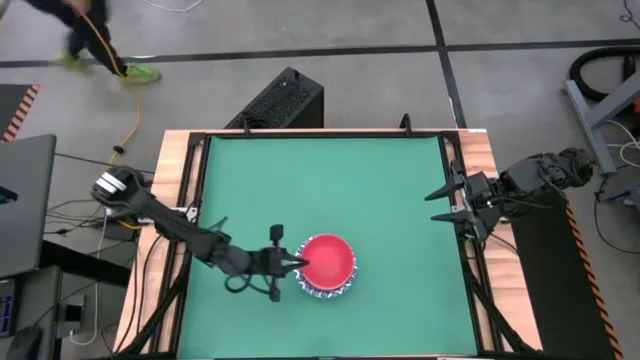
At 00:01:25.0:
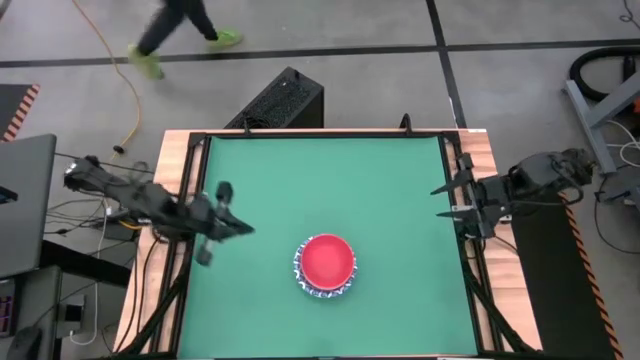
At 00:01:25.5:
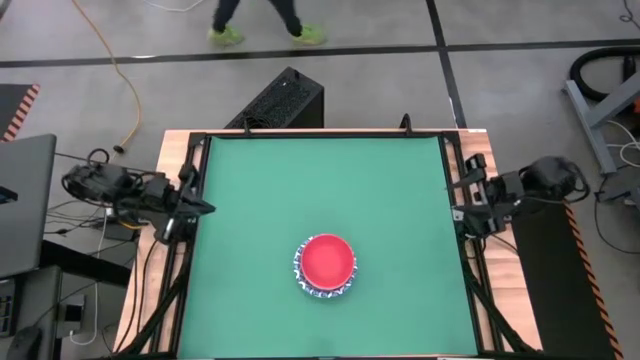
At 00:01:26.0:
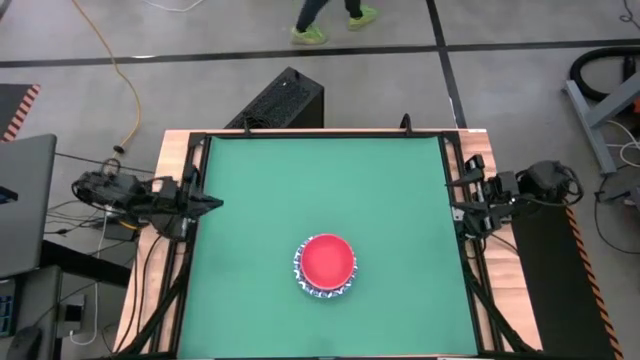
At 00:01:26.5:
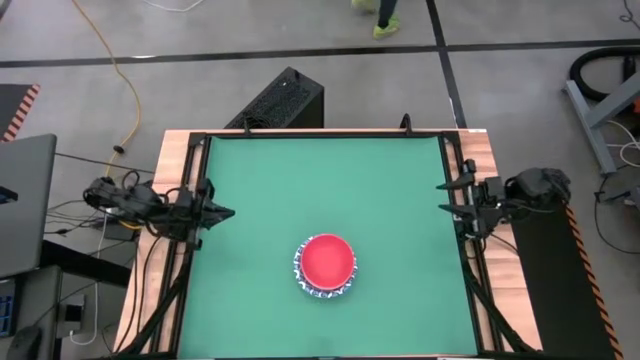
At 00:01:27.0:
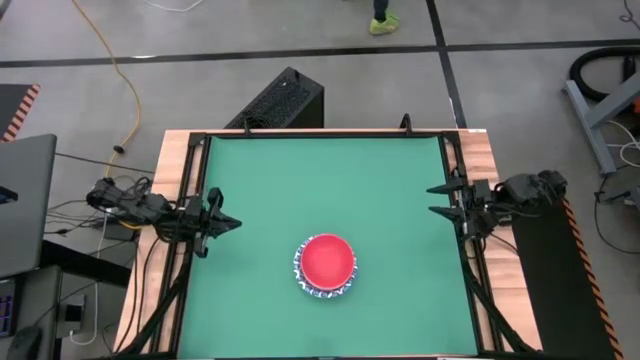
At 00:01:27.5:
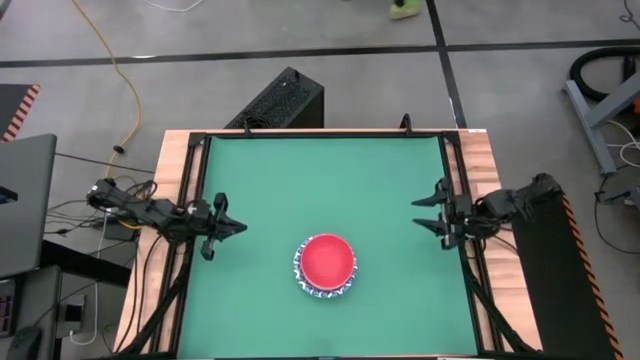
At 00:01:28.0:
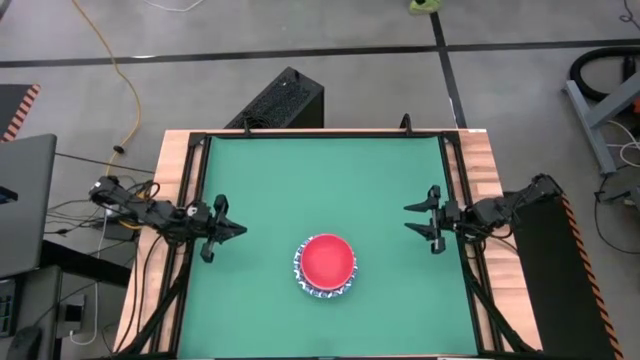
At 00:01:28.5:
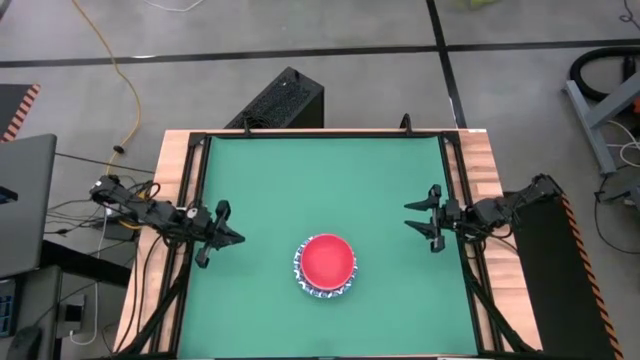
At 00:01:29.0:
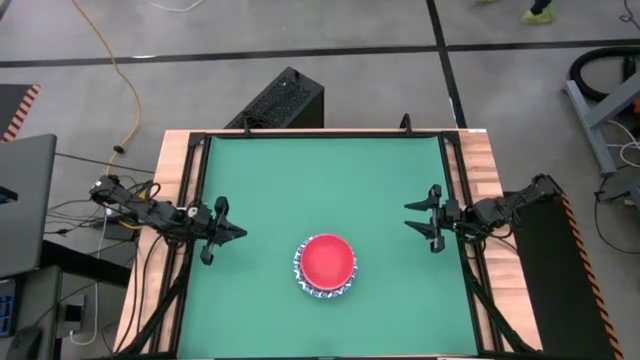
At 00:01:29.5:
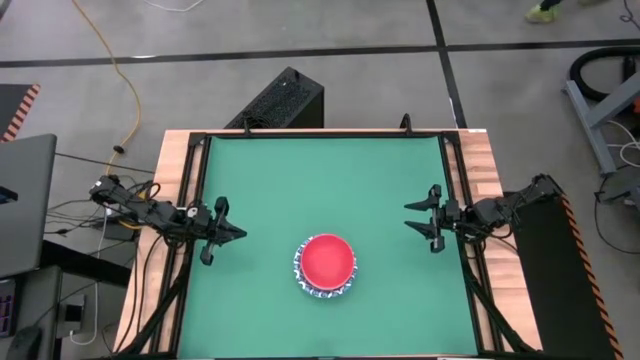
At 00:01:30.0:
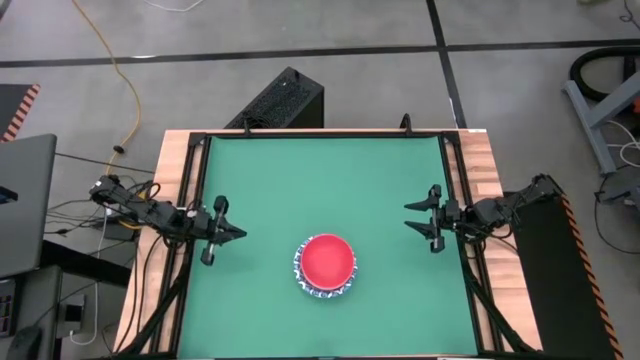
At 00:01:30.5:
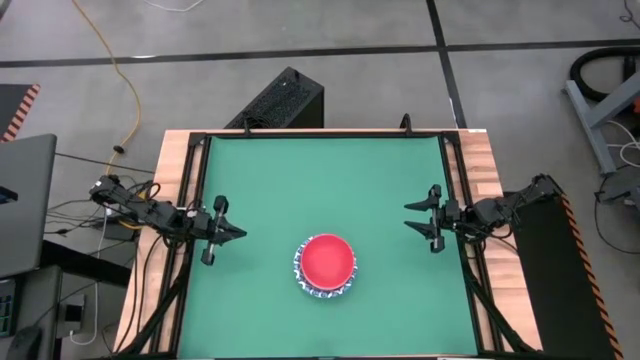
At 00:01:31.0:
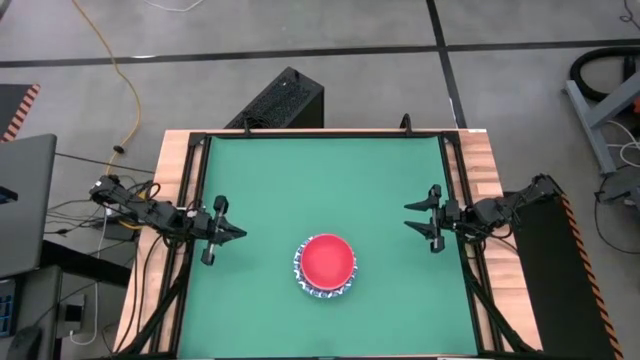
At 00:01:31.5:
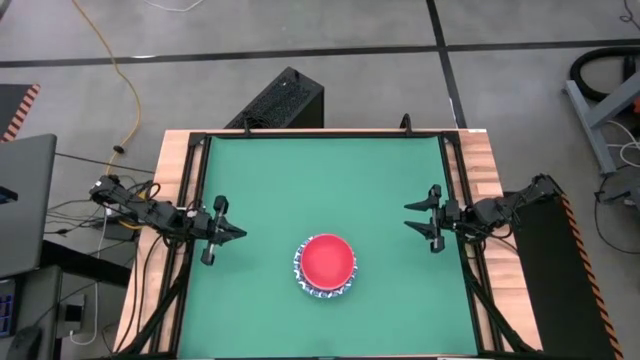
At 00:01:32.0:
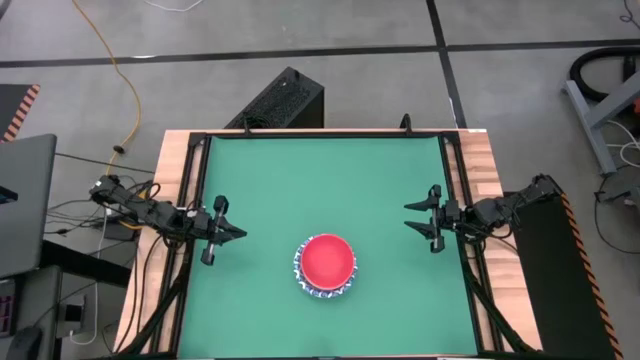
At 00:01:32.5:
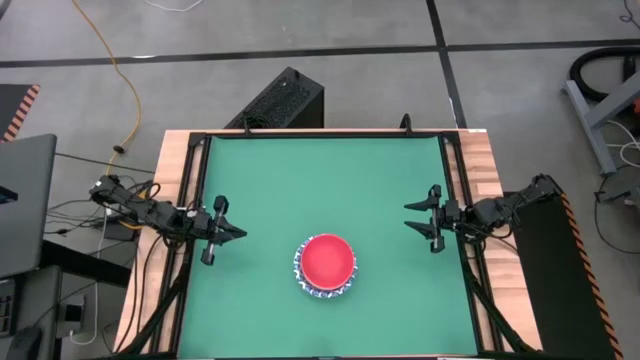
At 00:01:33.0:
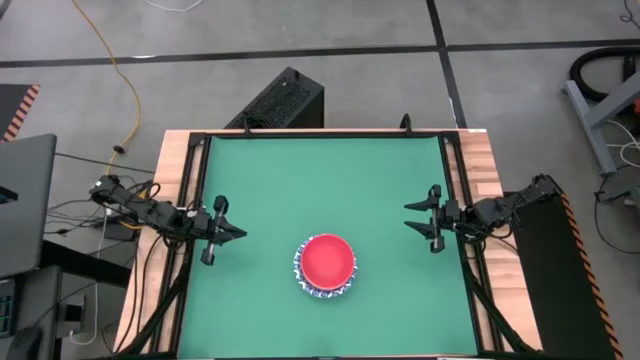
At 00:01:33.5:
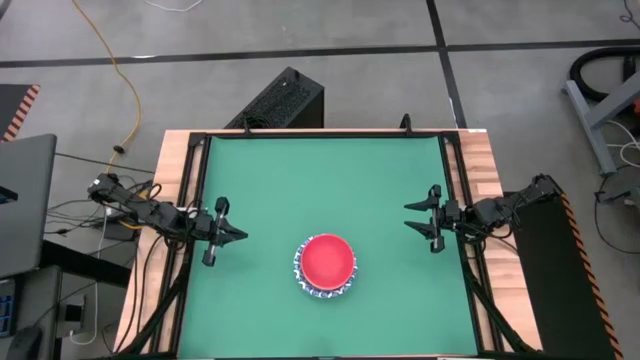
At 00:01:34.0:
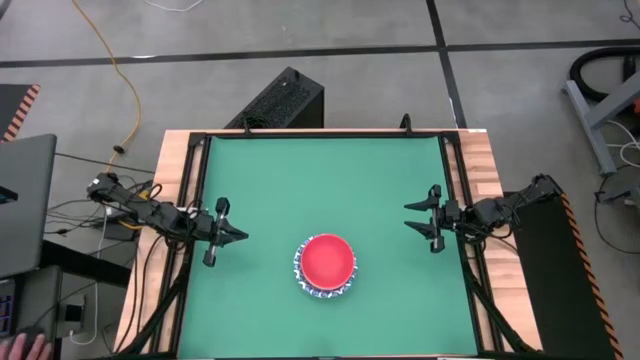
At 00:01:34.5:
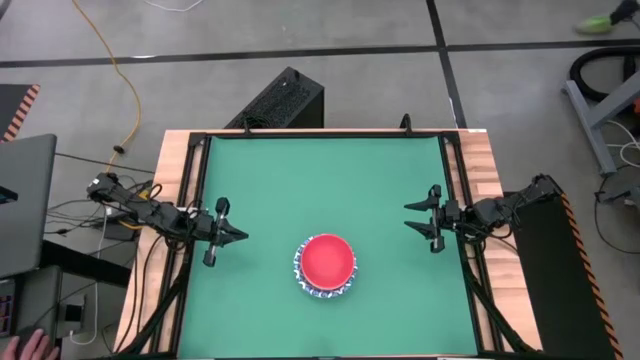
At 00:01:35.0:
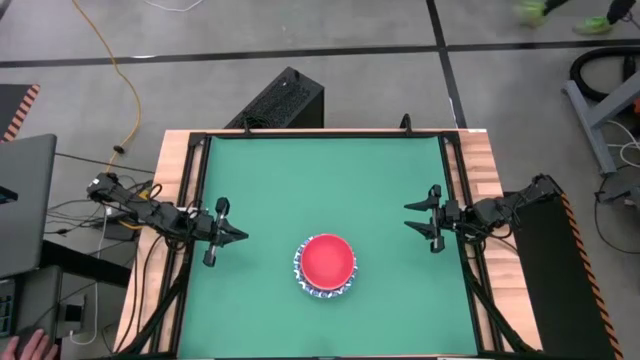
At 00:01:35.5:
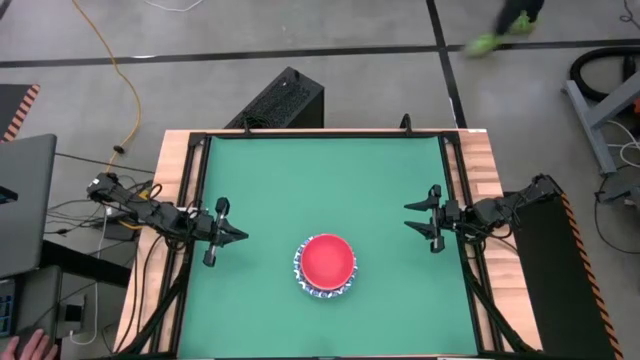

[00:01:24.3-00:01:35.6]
Return to Home Position
